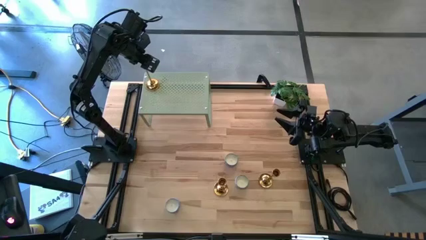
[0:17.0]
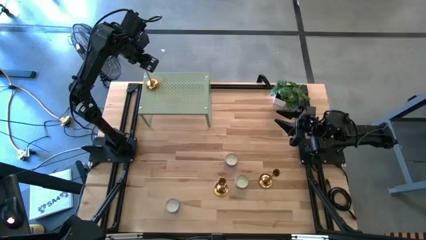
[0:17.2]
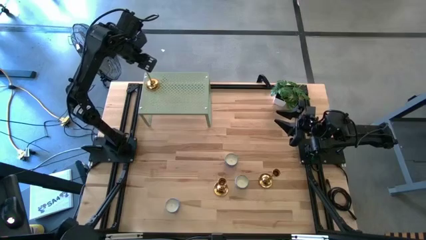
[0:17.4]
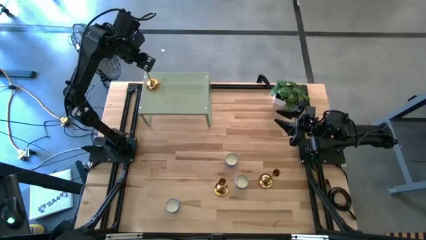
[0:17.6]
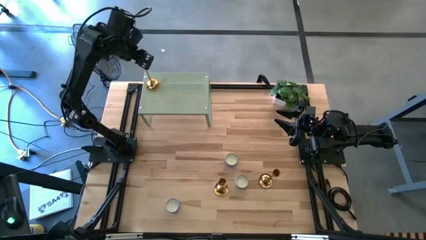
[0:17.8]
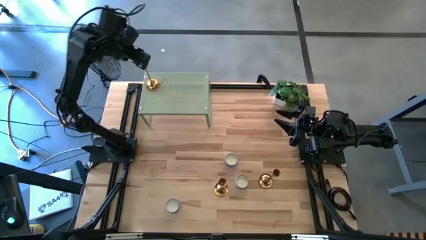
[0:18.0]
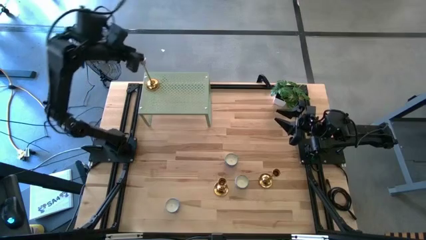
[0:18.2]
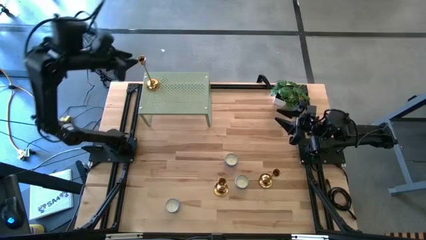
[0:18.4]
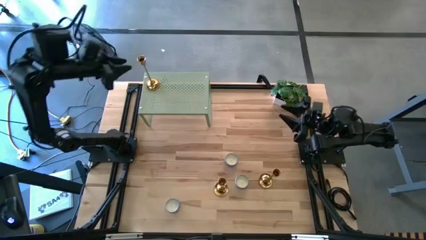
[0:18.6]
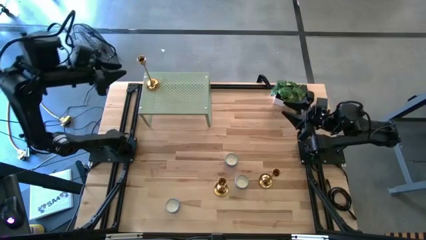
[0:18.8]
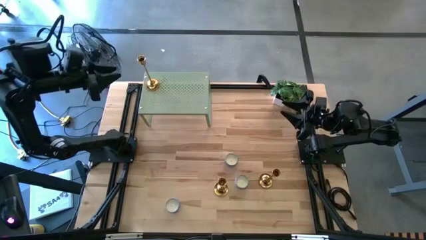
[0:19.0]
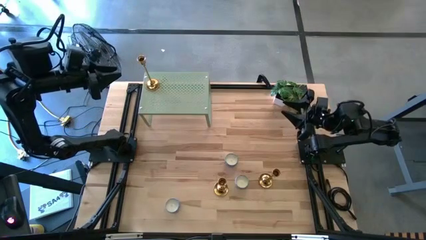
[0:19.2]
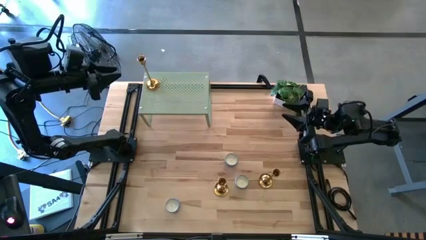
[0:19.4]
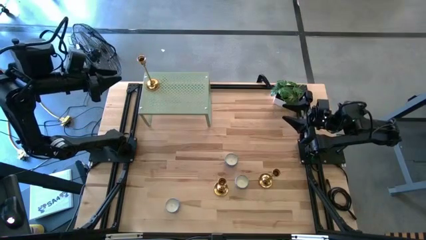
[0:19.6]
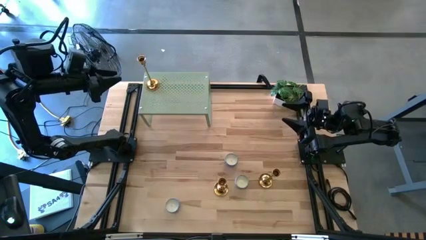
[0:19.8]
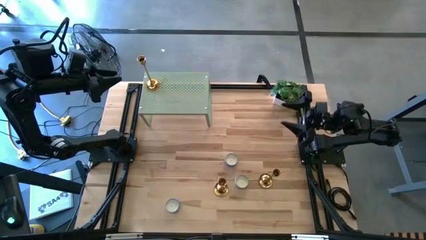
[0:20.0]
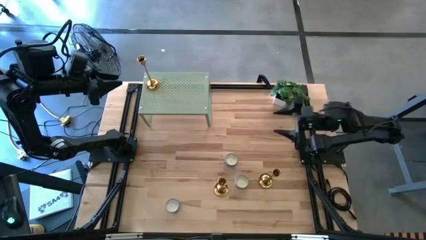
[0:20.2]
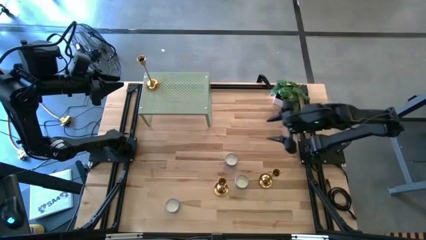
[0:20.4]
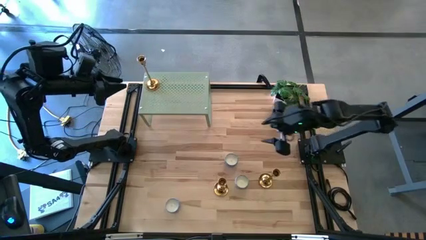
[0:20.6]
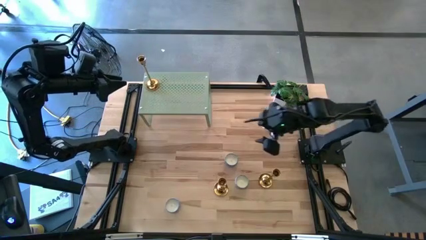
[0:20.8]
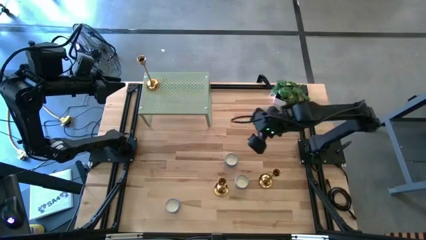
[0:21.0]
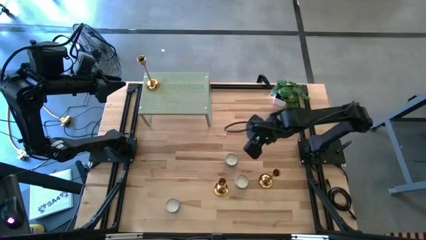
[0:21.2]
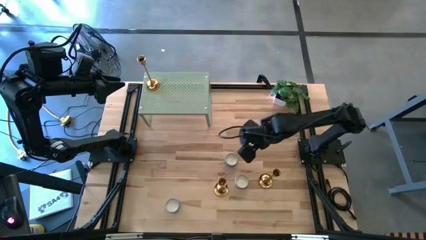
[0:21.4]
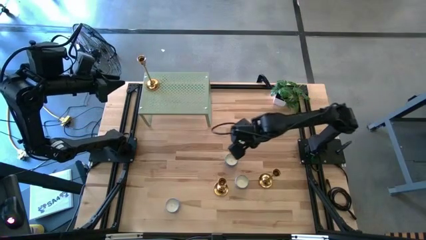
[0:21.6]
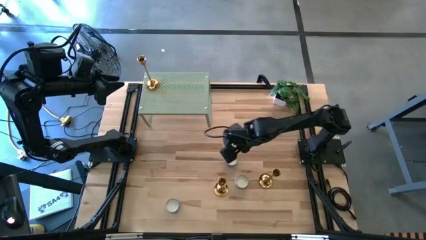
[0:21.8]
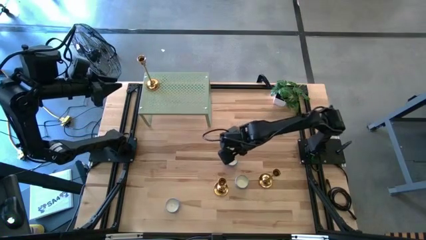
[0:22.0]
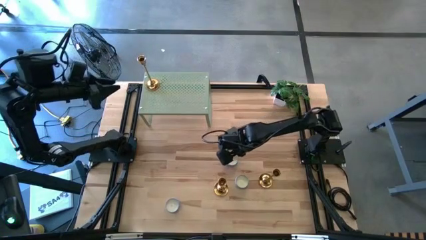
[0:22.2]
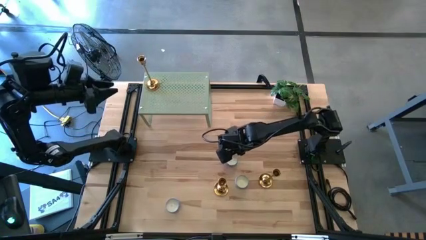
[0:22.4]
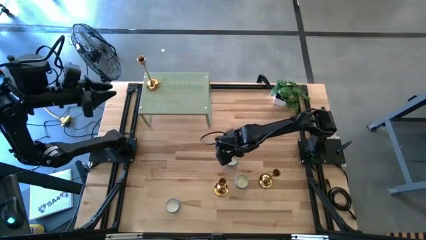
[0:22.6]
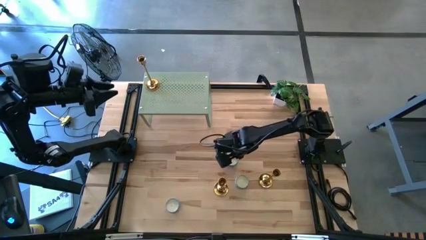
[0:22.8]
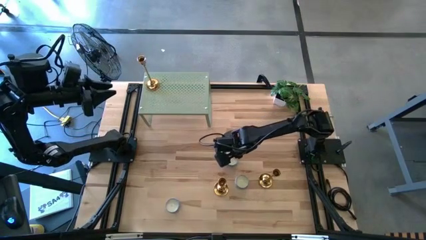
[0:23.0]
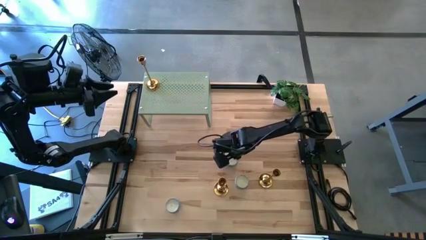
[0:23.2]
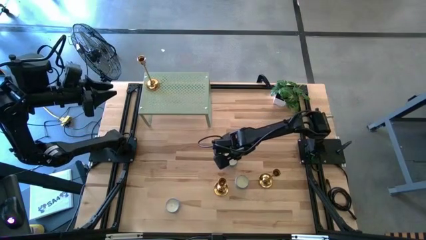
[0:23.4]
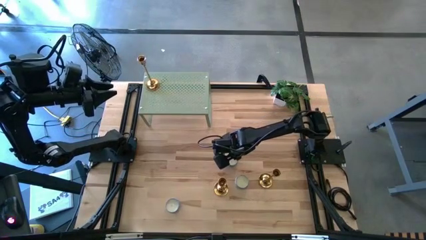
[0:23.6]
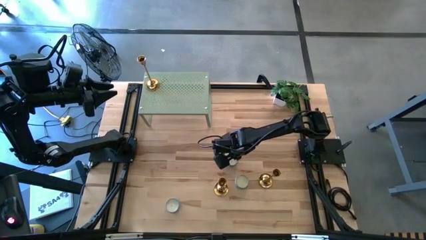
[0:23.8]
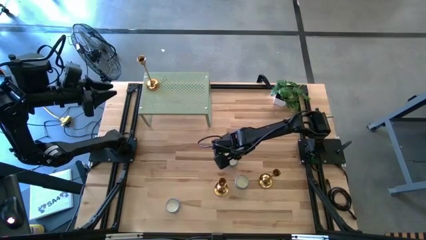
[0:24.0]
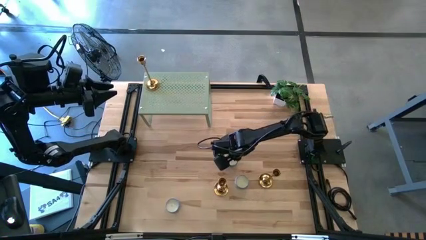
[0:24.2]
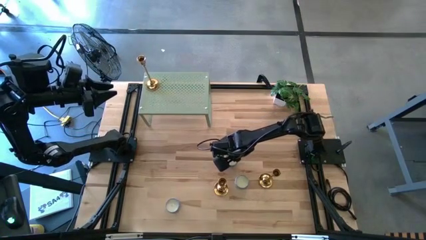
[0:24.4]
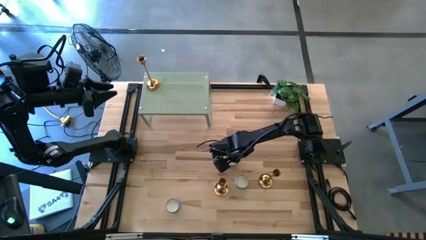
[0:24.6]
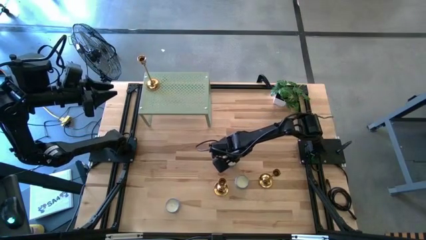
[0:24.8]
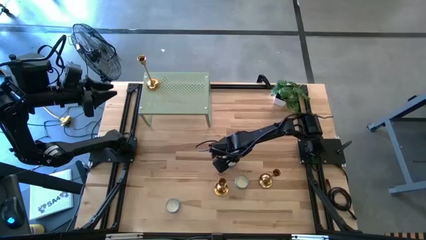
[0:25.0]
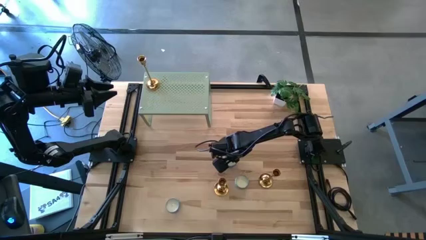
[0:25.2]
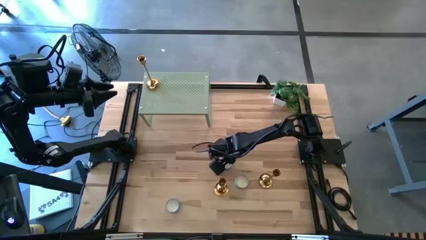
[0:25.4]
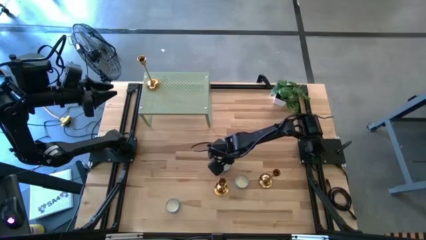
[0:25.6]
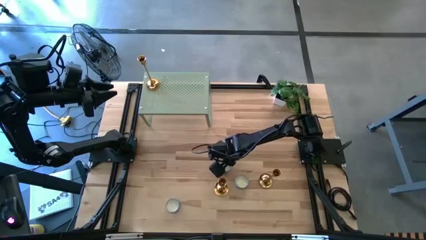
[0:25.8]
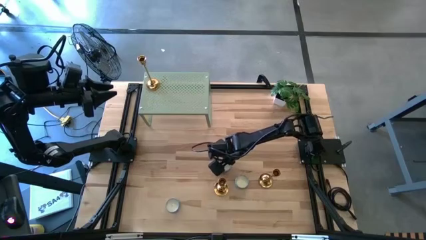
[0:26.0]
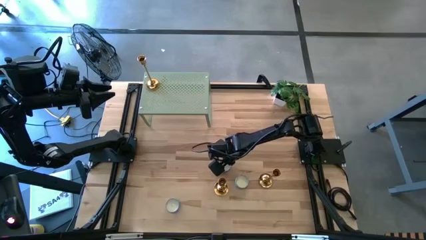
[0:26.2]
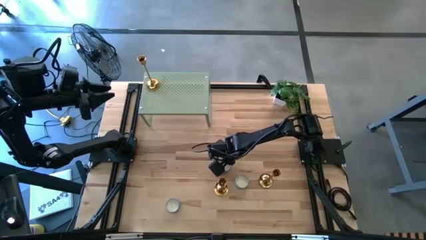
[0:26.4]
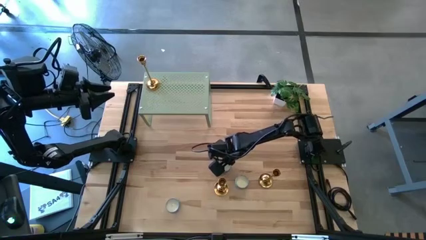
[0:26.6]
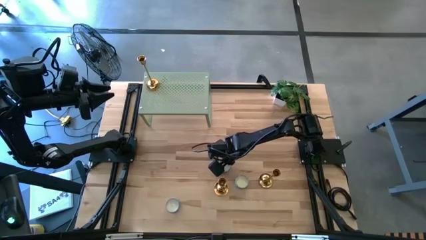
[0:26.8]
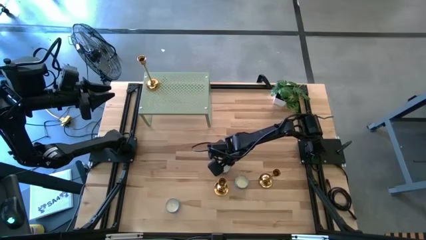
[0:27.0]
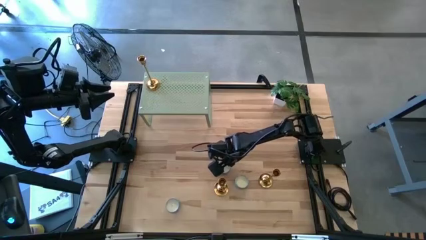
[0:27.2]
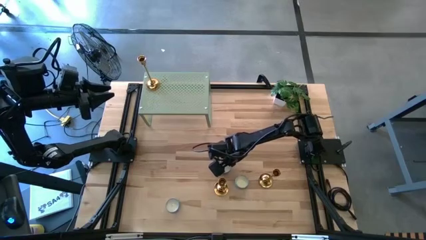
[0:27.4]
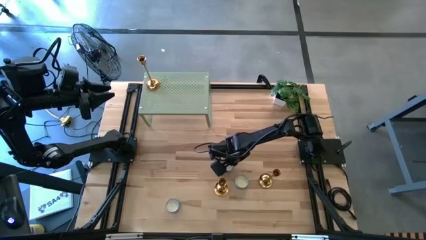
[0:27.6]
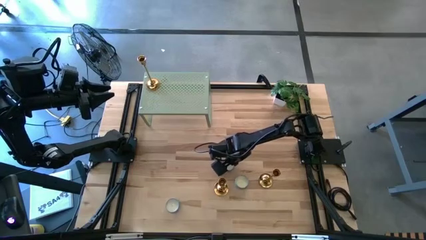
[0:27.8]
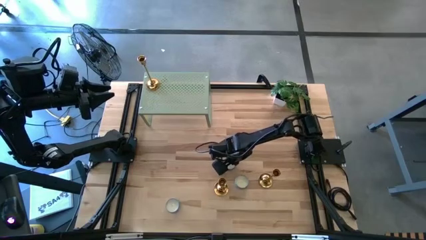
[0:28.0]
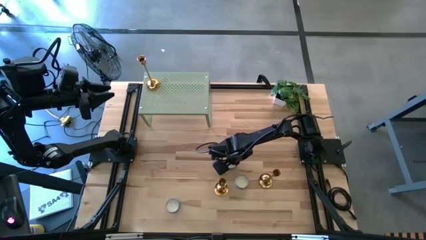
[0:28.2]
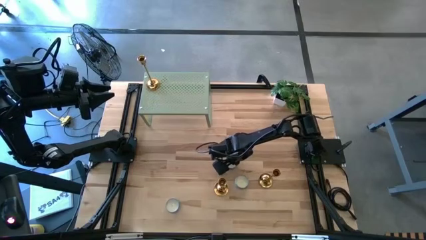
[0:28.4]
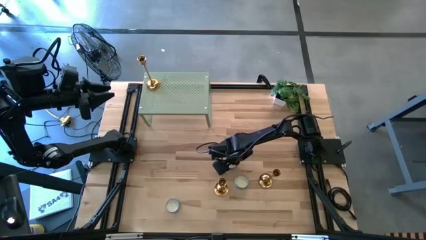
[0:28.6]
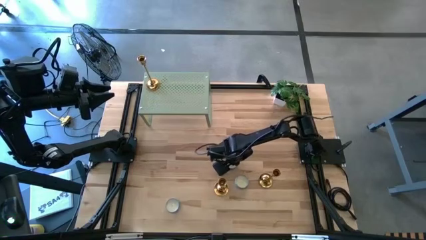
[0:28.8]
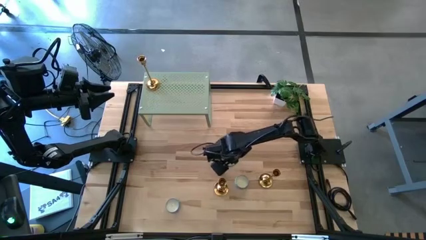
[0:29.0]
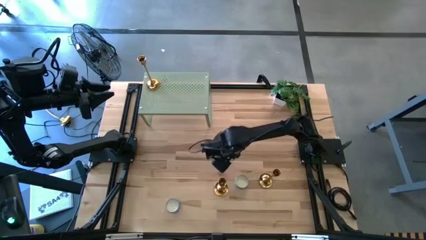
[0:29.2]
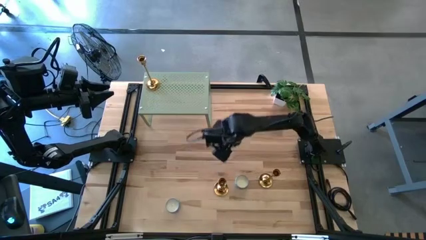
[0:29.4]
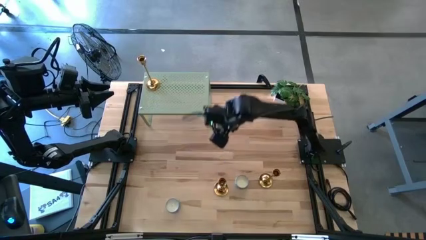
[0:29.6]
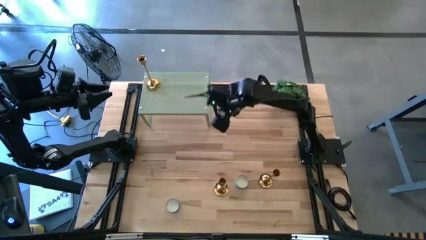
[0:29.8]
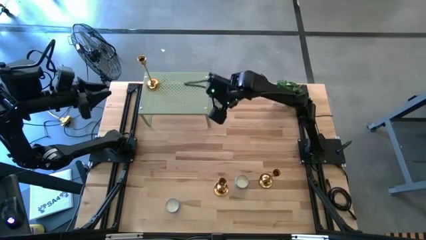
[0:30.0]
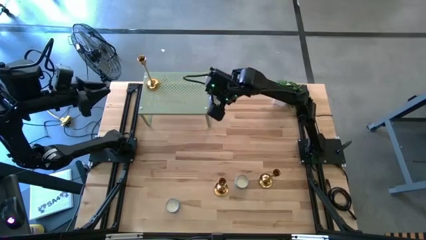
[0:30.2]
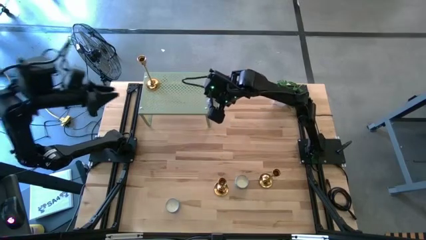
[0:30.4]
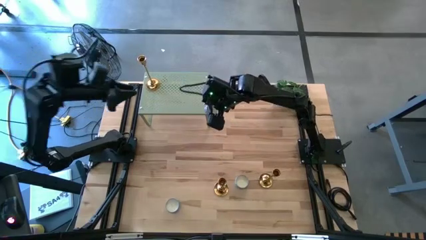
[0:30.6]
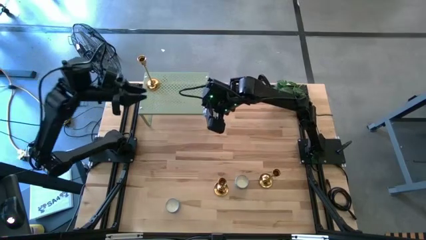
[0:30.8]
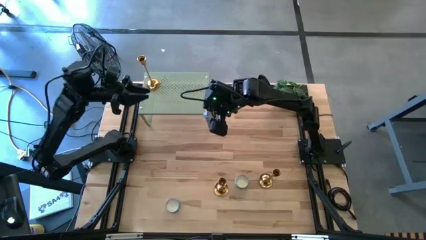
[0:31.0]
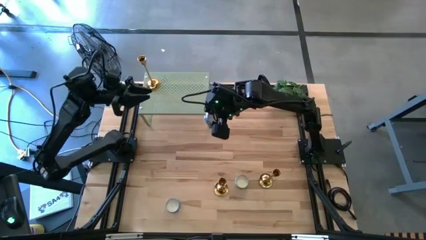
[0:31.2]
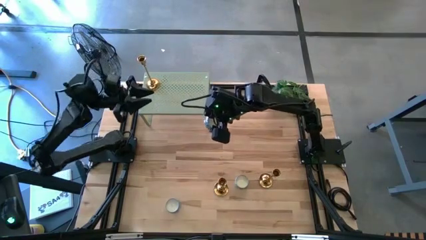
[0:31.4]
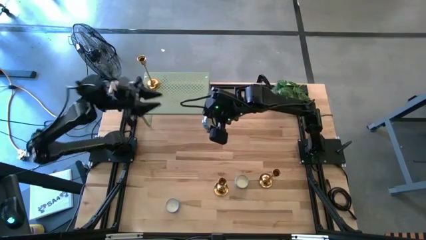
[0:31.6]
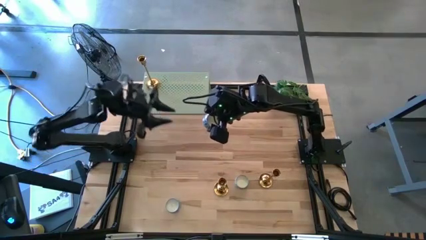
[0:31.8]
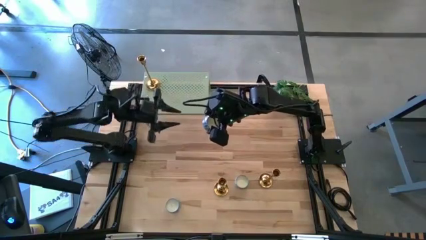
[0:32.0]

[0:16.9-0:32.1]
Task: Pick & Place candle stick holders
Put the top right blue patterned round candle on the shelf
